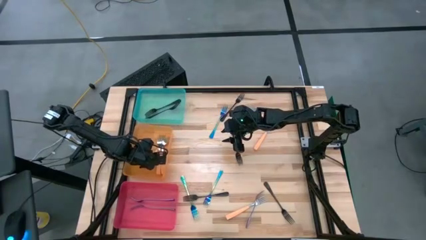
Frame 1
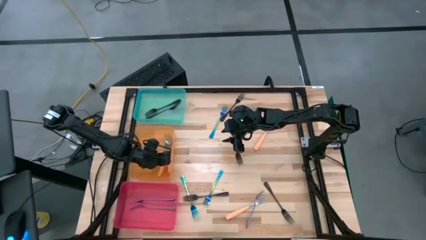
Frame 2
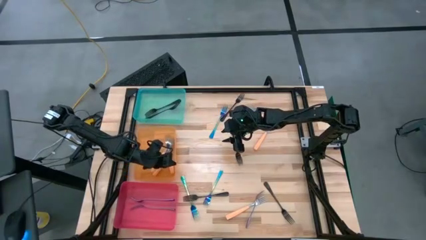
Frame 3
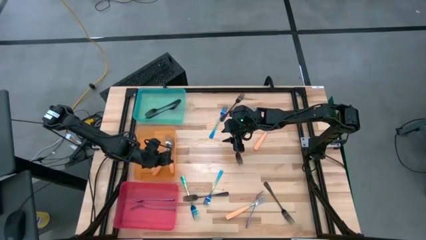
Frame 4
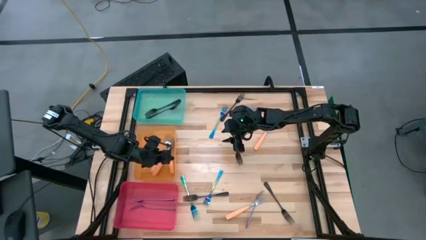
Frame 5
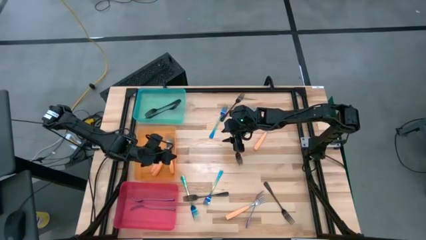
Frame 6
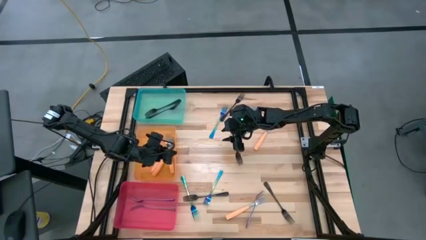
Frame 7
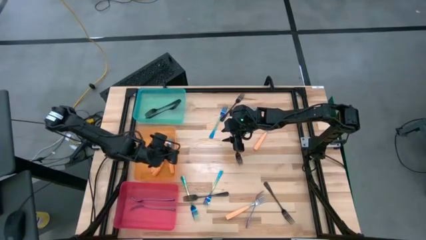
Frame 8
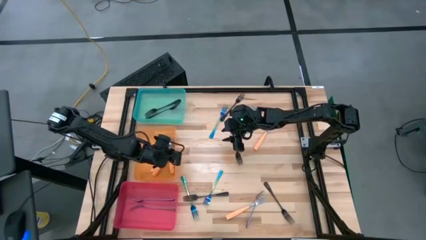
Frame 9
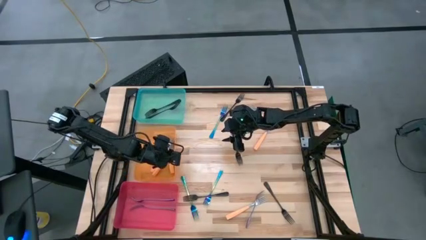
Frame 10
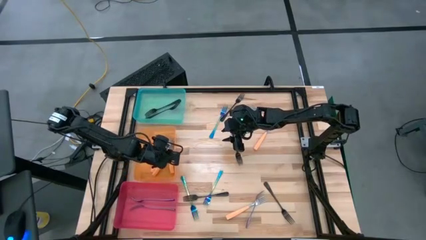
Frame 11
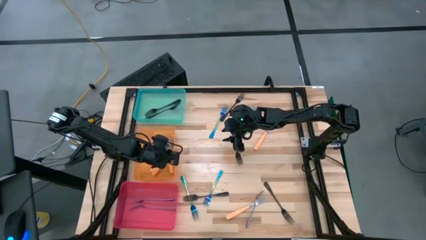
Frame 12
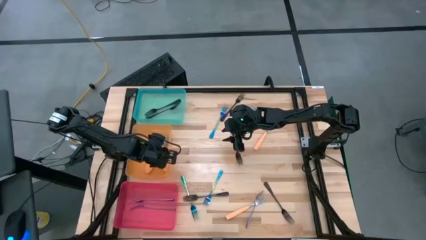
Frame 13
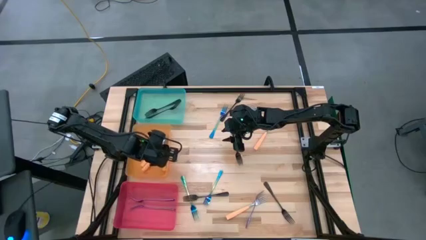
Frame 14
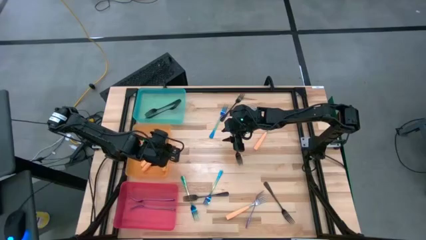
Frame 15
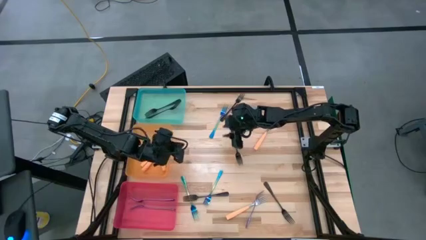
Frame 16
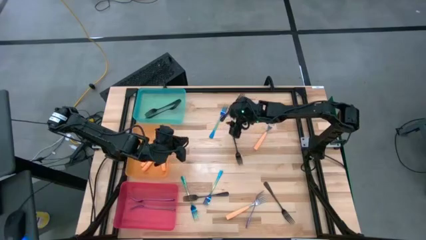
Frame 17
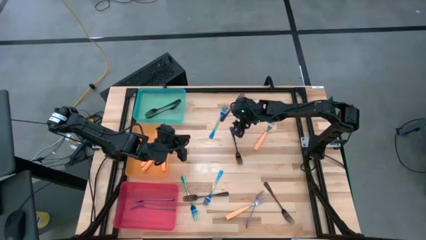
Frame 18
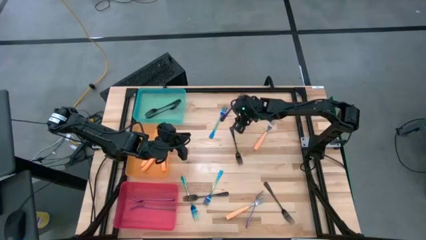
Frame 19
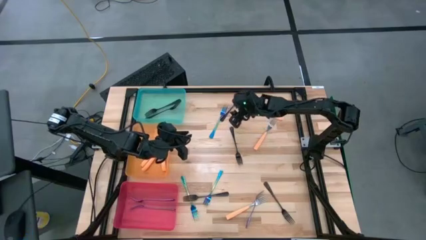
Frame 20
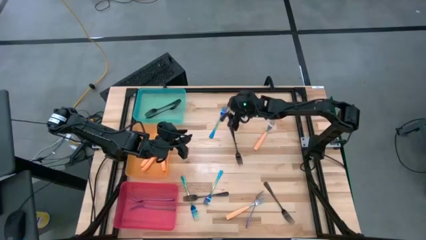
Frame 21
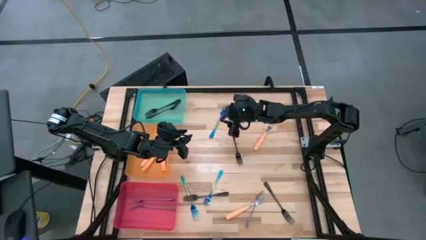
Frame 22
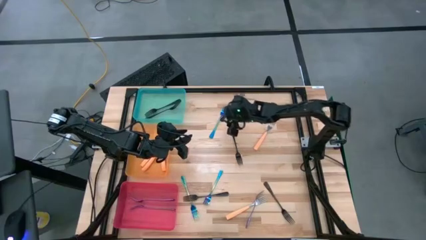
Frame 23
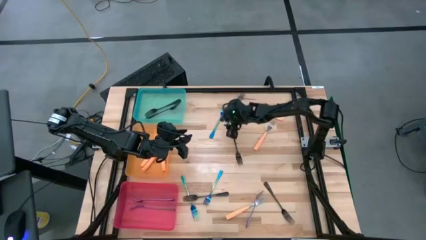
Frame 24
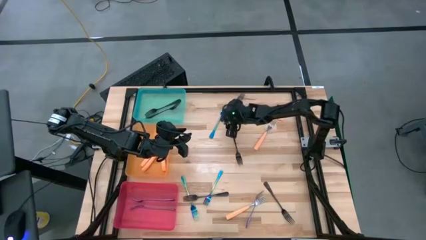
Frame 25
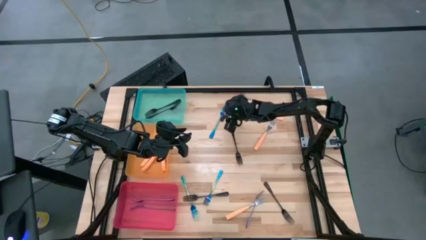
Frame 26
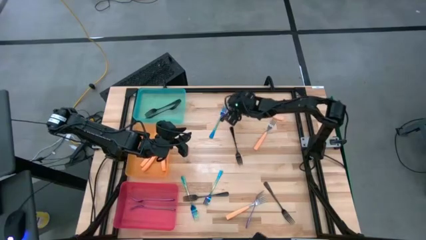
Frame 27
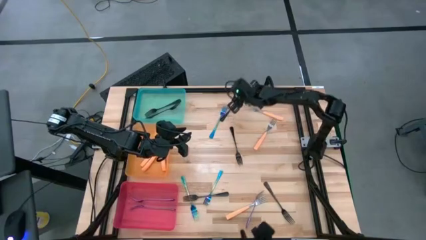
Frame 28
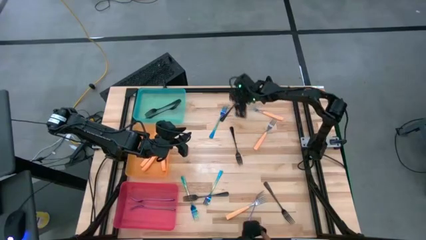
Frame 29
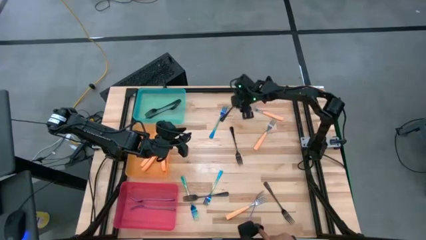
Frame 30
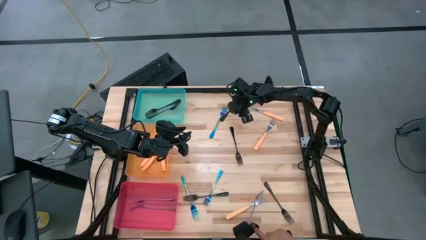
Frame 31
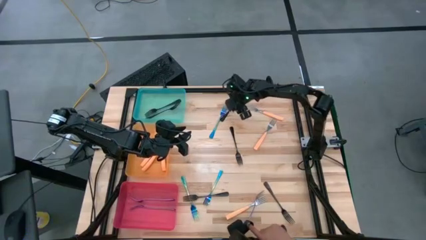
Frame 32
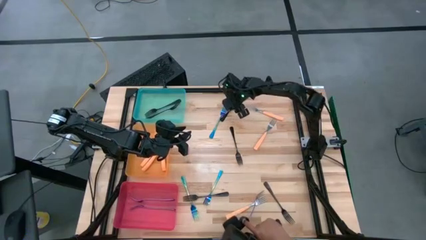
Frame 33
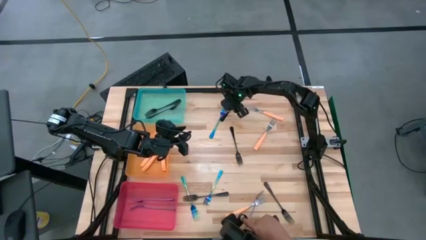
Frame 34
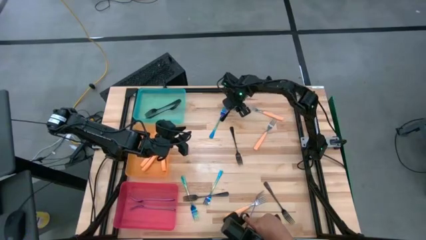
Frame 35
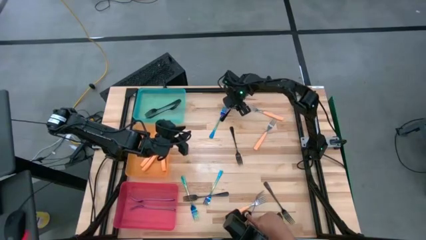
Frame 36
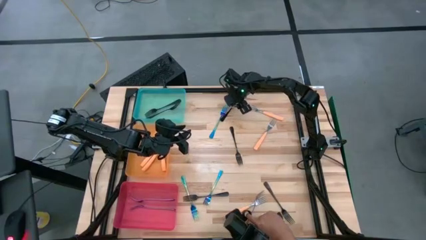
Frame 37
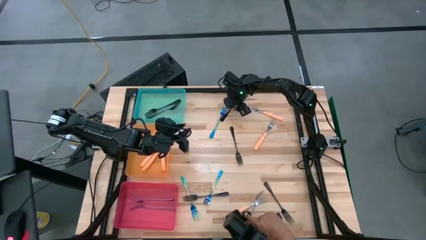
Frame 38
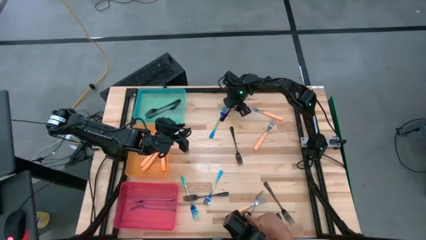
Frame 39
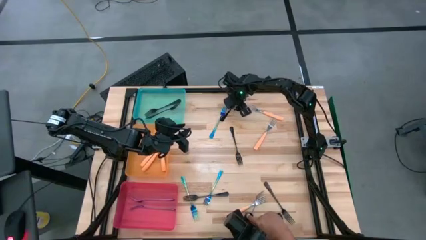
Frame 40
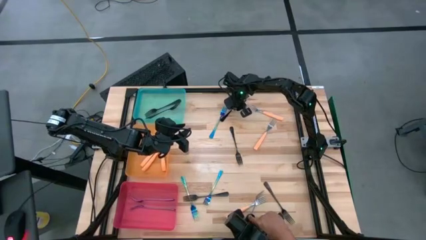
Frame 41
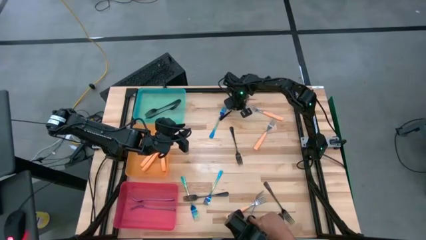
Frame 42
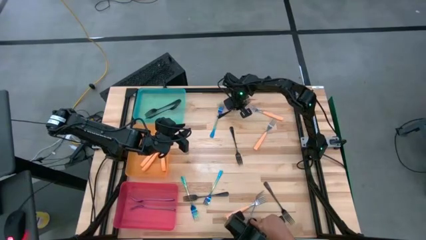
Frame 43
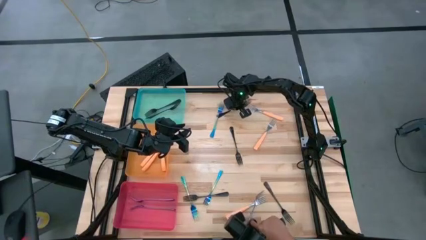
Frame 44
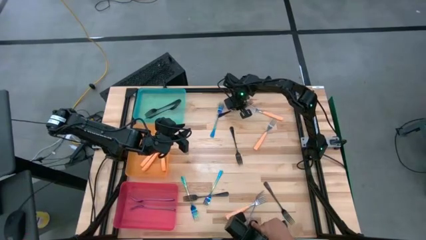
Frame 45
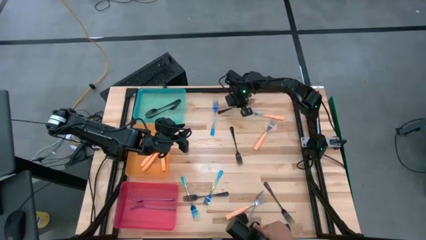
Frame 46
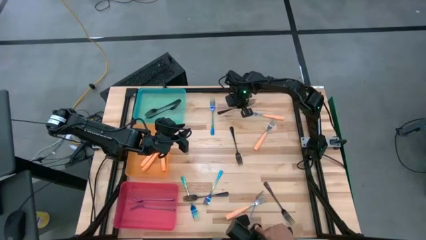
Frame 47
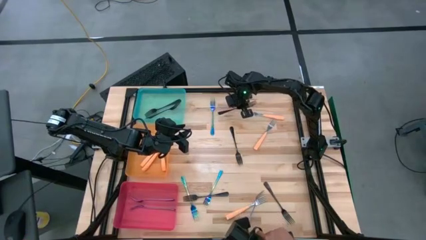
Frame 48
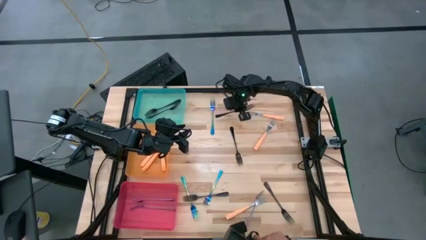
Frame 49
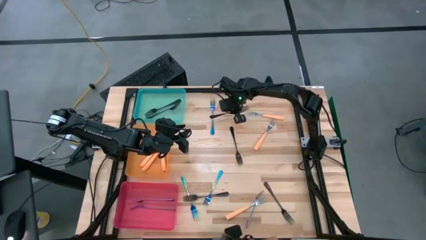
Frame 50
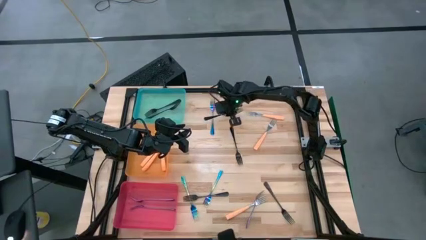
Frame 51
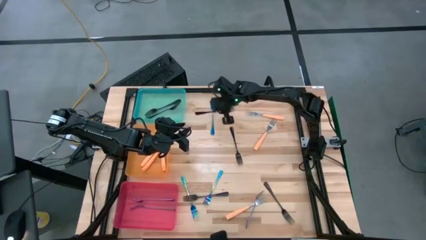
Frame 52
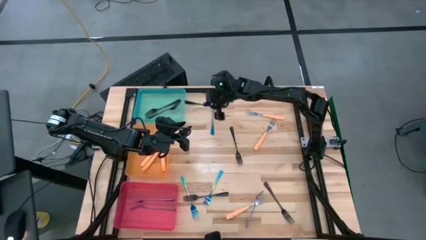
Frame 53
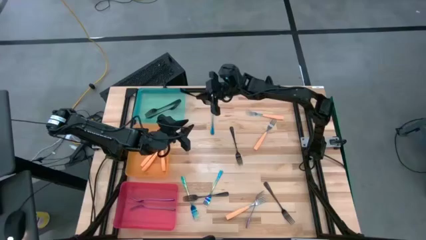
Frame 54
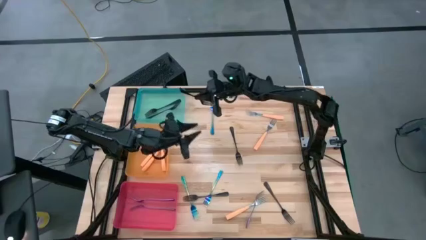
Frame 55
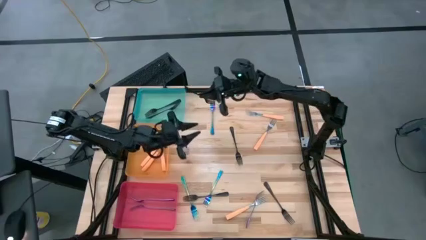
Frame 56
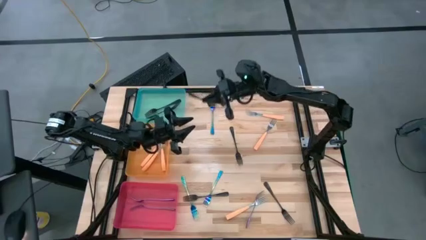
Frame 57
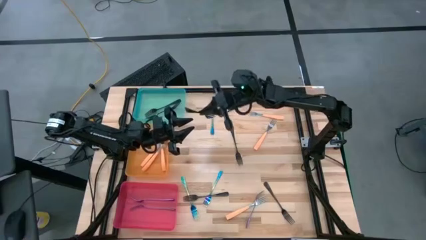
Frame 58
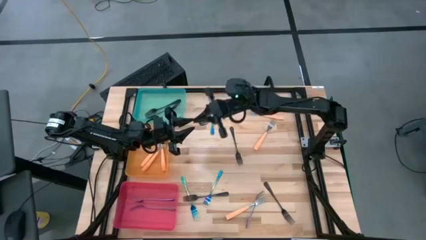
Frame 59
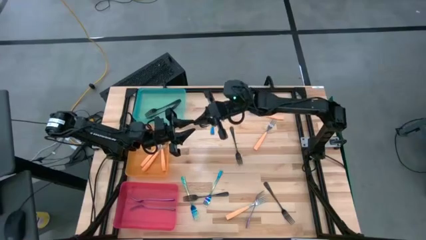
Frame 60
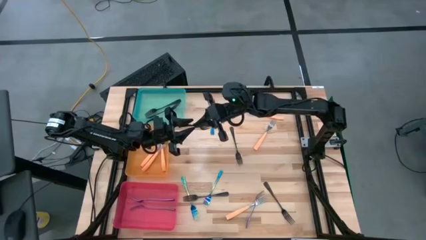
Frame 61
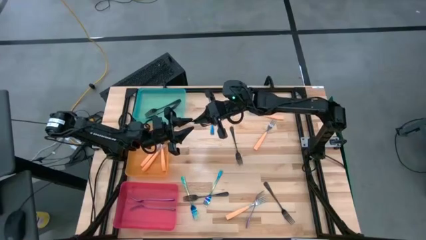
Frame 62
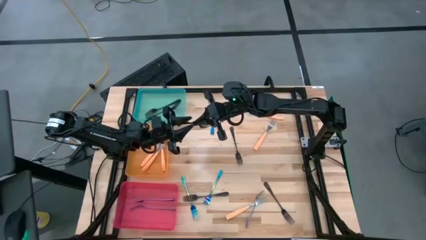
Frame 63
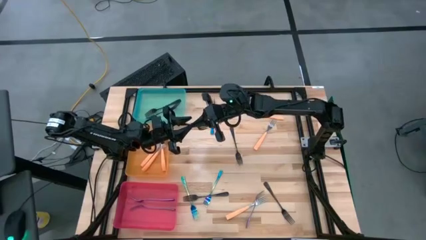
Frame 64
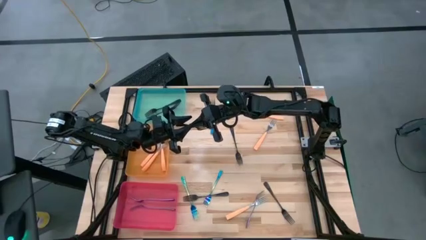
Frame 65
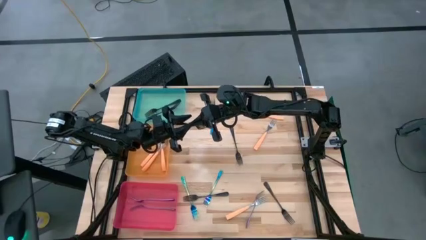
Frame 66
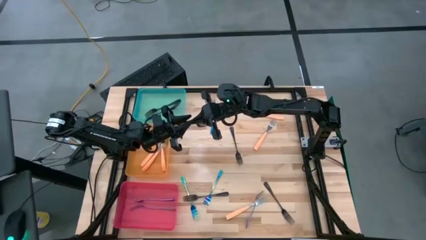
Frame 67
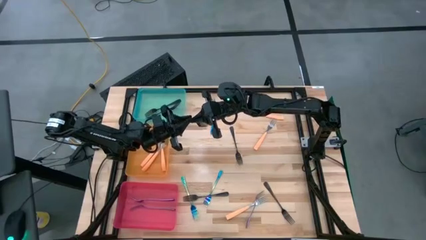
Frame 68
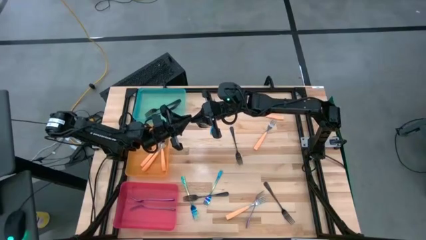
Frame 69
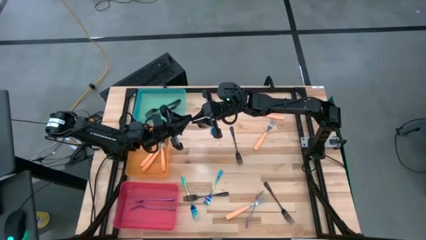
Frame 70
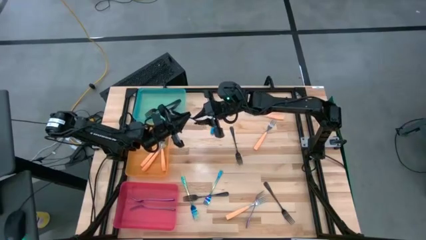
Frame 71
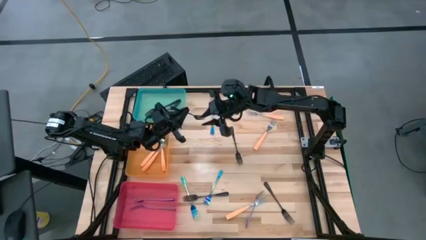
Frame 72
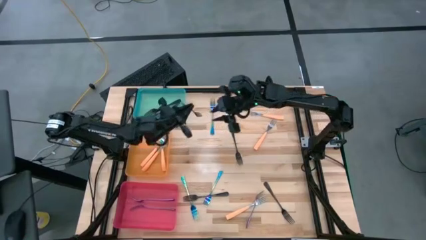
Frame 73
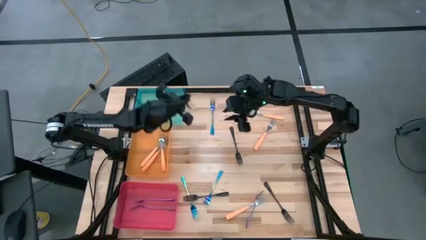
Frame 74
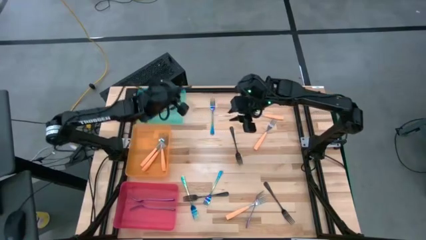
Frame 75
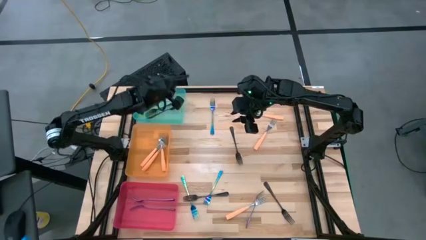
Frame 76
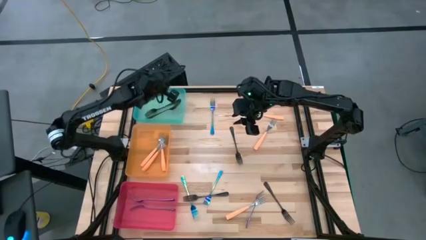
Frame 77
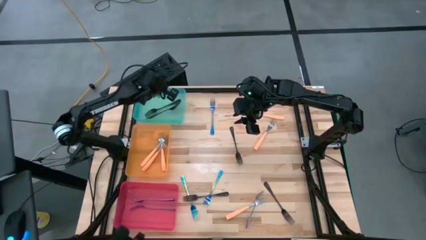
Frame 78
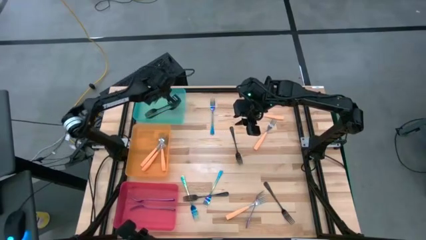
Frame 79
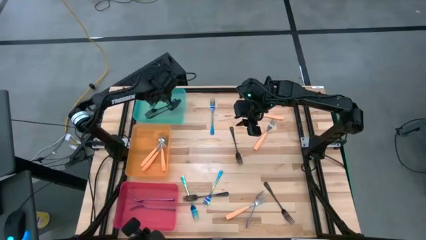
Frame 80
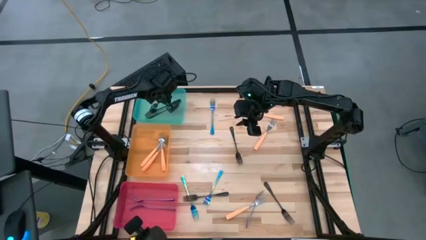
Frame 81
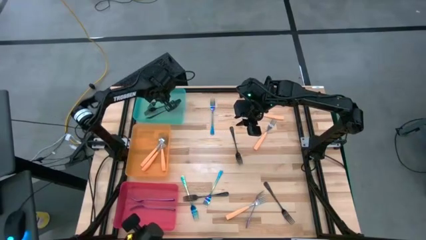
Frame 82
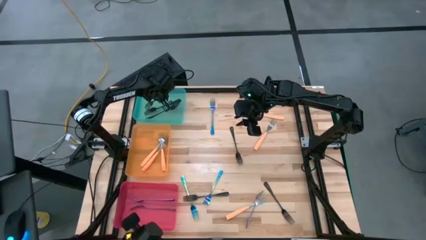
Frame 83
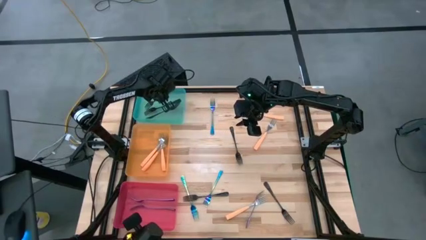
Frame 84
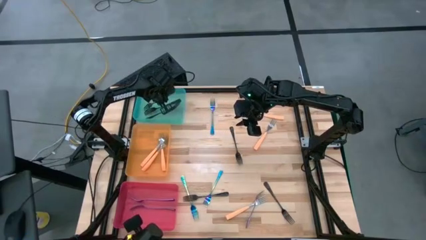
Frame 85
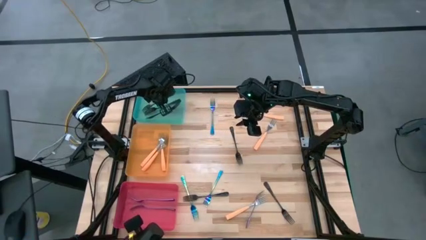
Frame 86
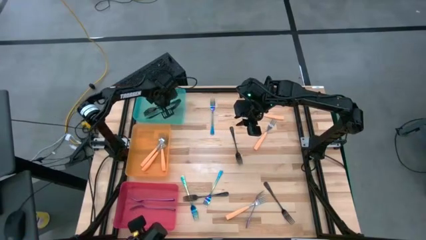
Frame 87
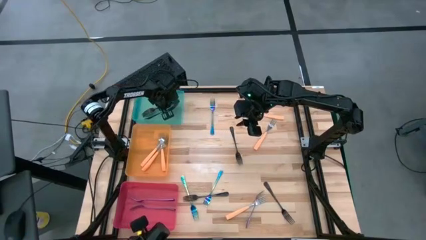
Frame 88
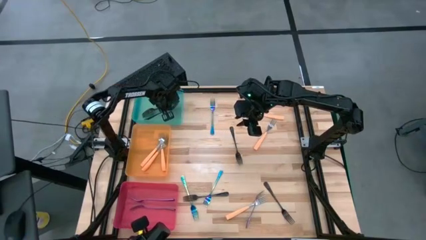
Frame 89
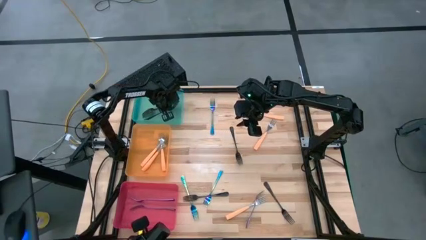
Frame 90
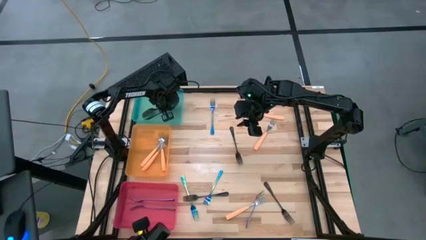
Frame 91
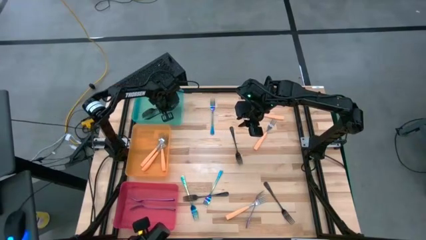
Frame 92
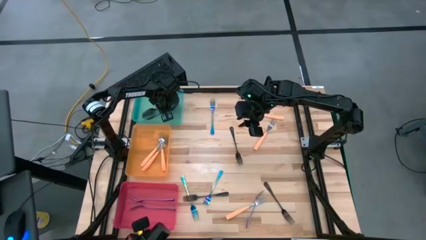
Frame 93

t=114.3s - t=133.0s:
Task: Sort silverware by color (type)
Put the black fork into the blue bin
